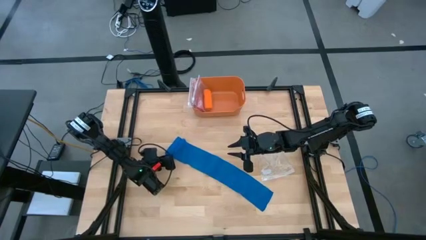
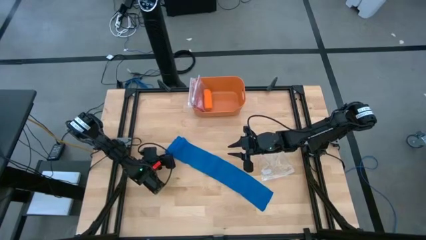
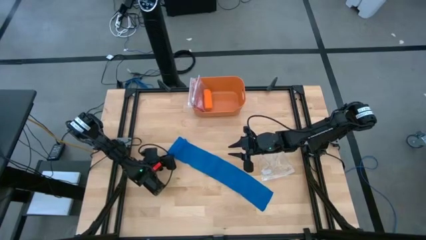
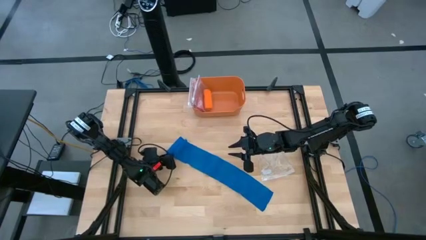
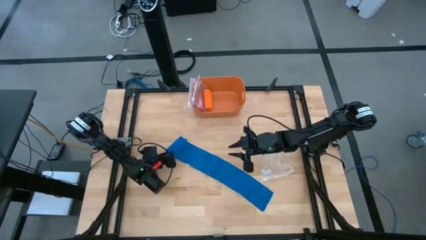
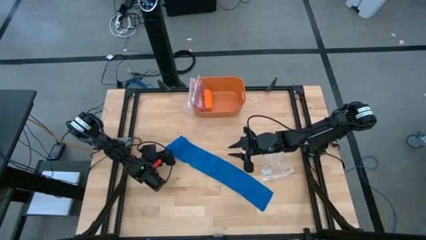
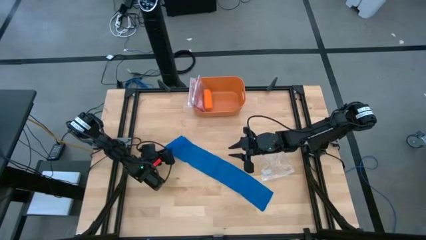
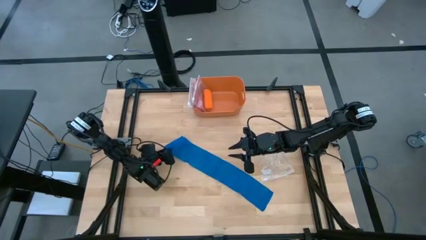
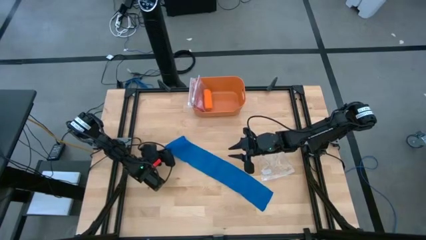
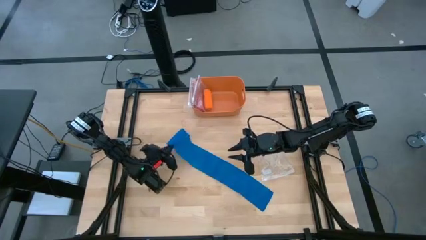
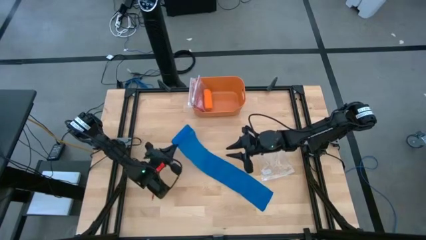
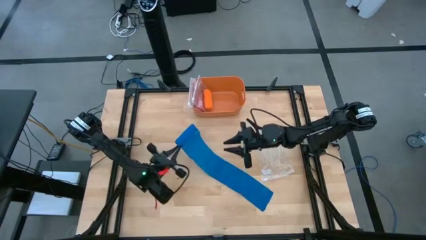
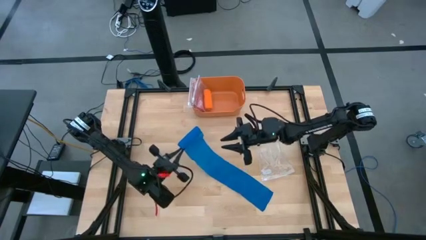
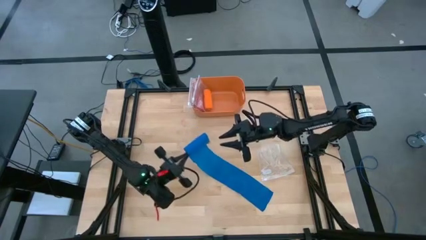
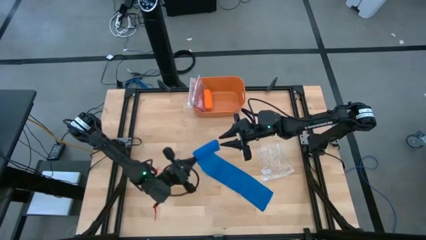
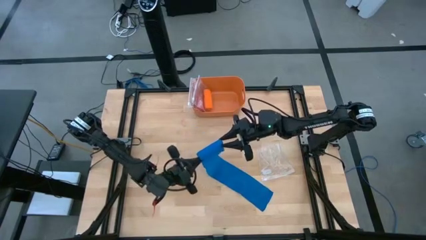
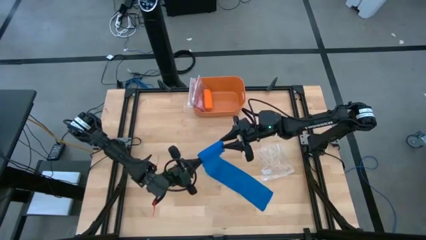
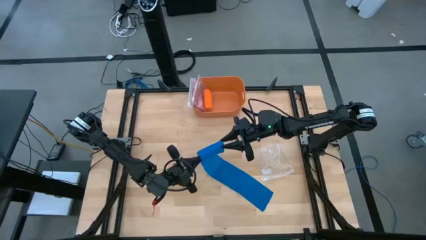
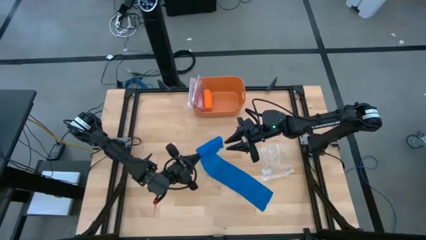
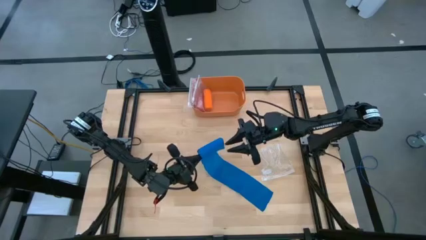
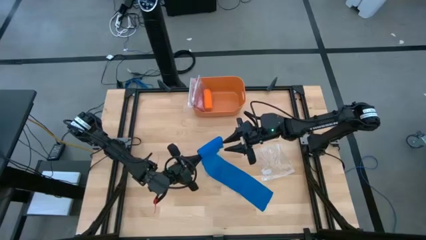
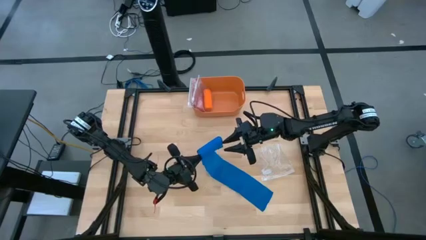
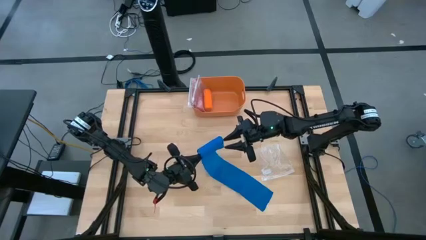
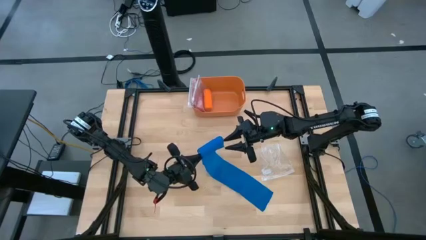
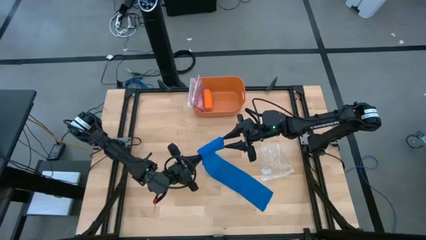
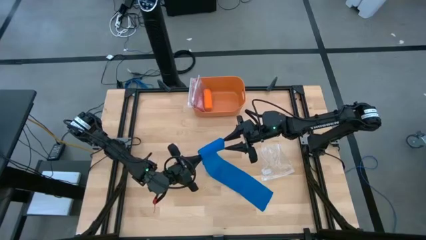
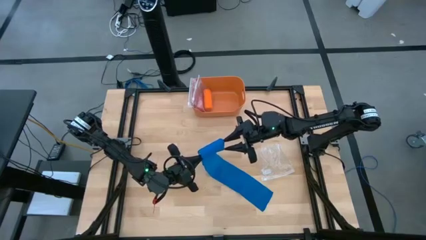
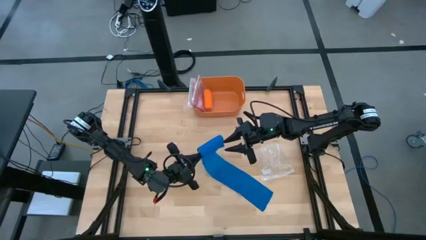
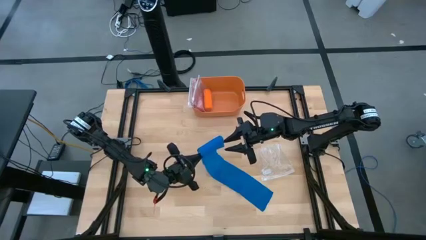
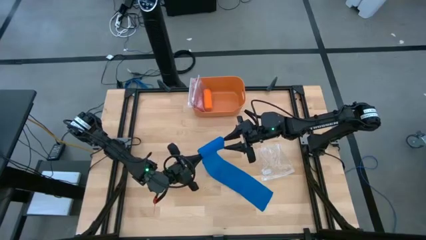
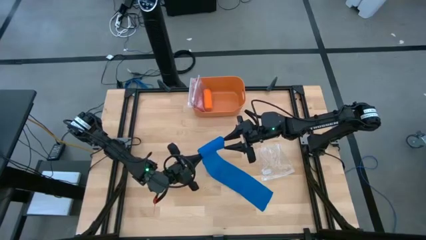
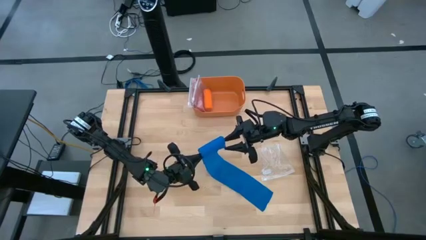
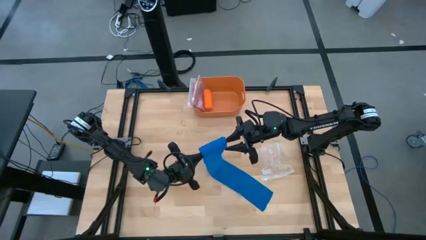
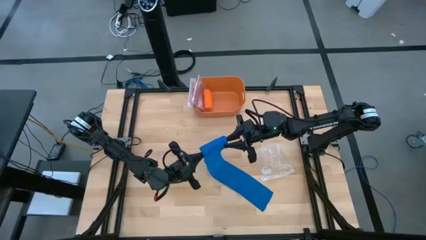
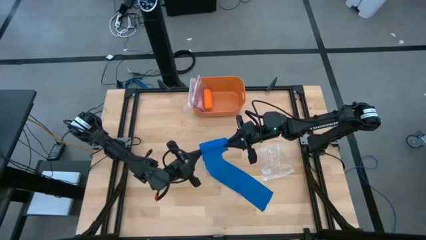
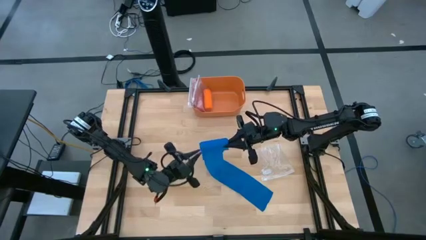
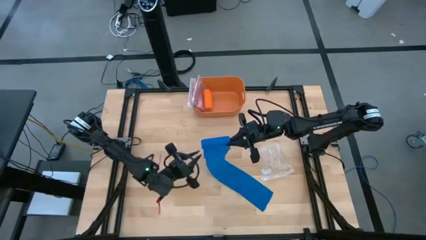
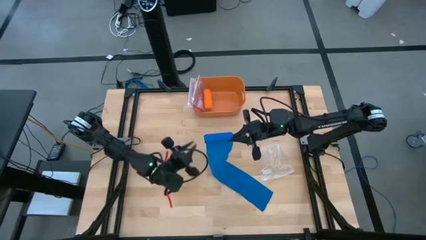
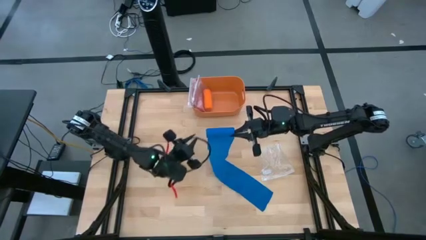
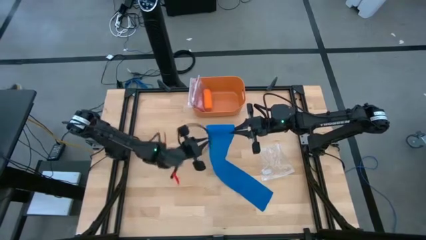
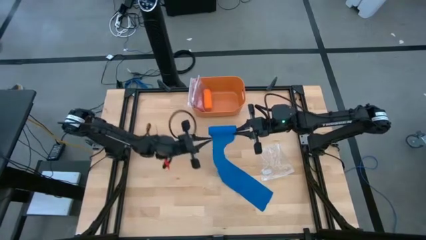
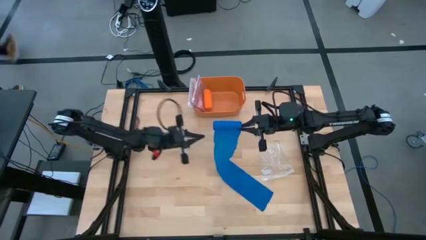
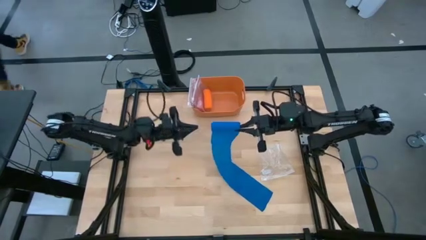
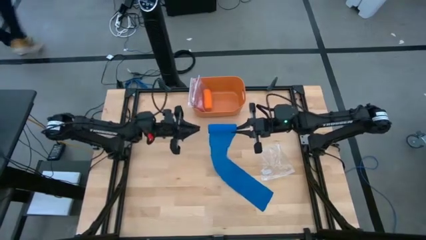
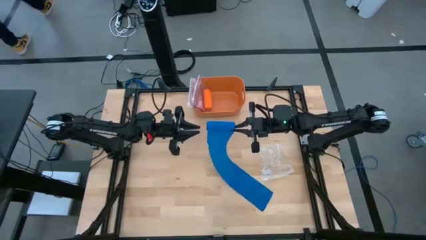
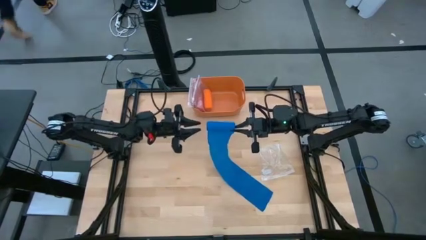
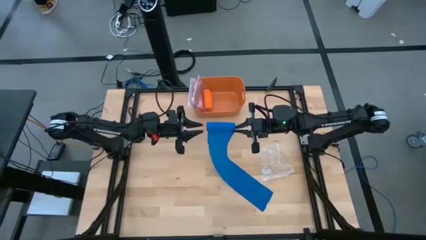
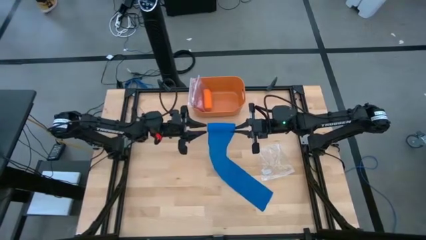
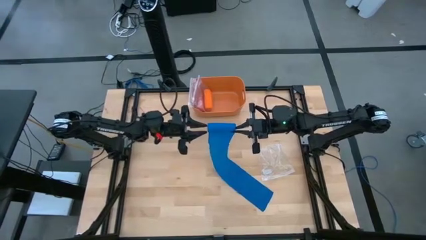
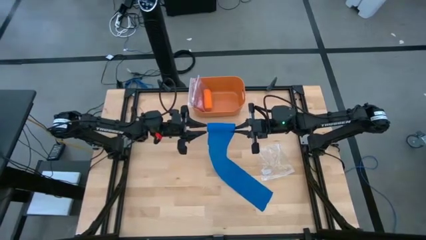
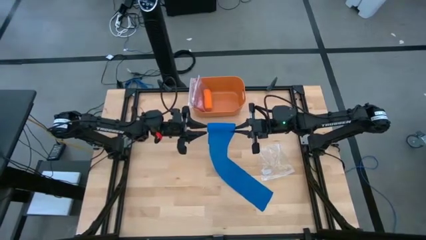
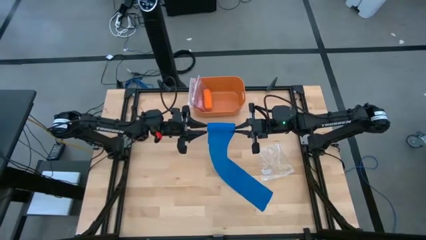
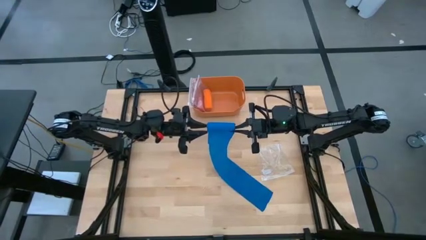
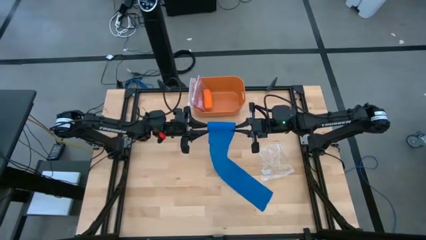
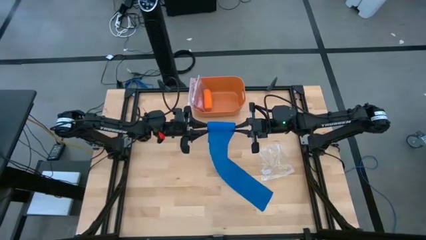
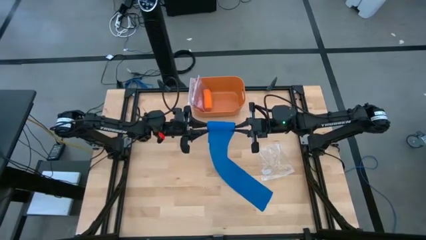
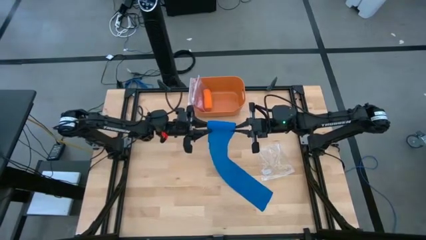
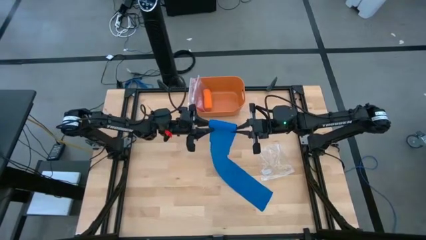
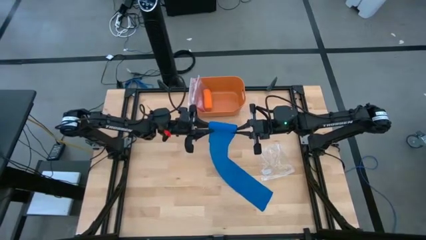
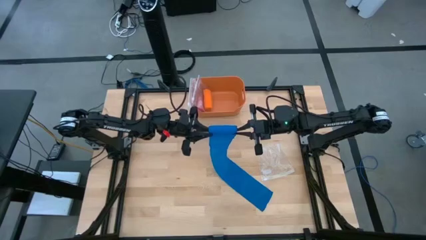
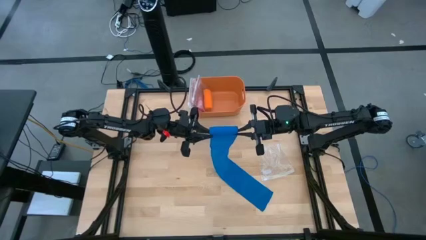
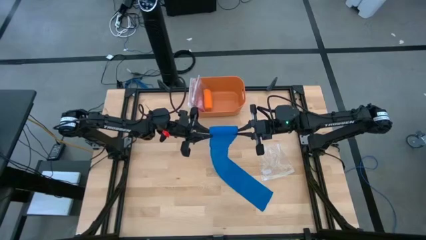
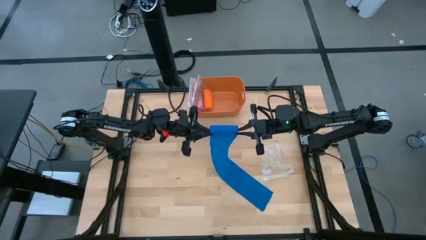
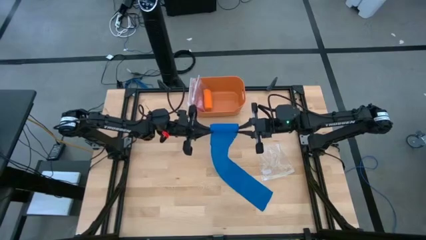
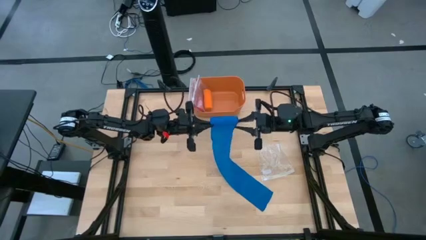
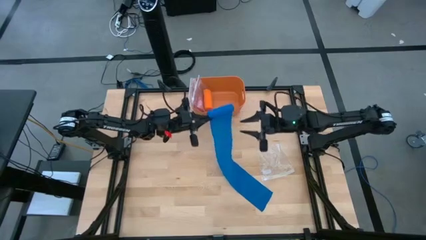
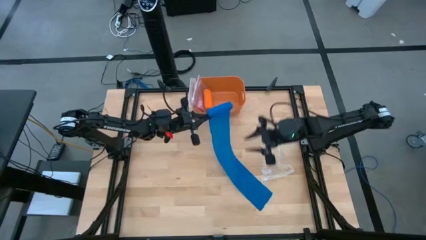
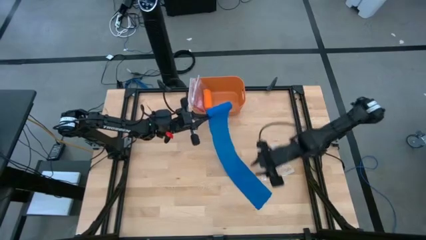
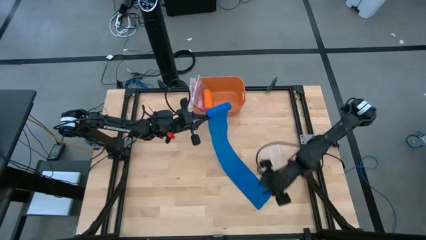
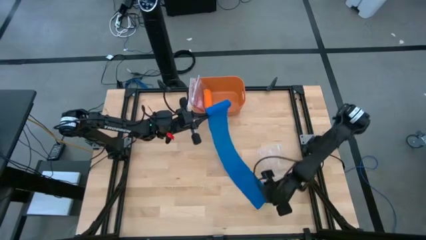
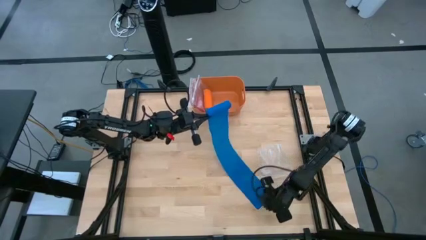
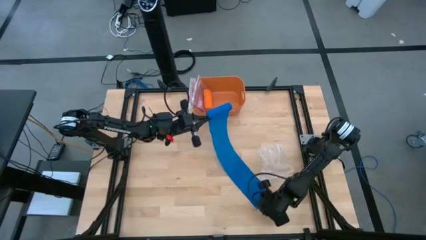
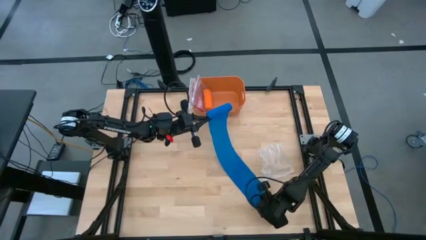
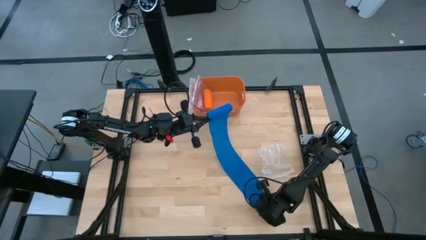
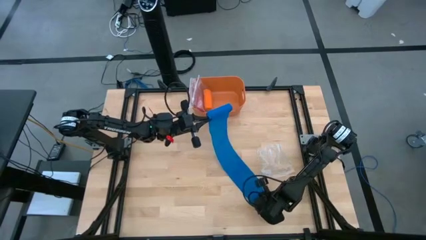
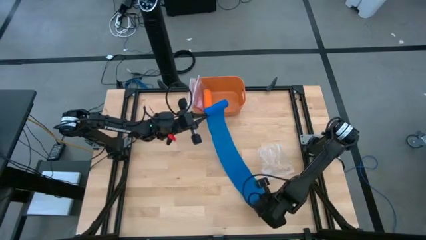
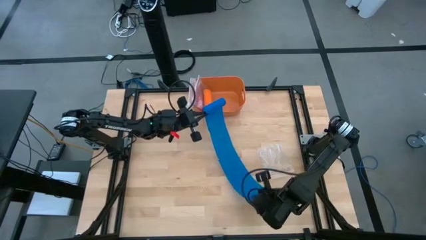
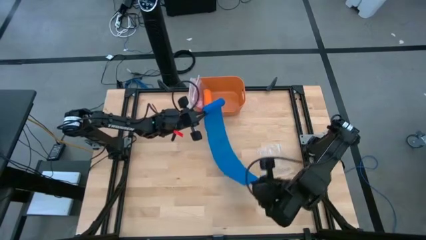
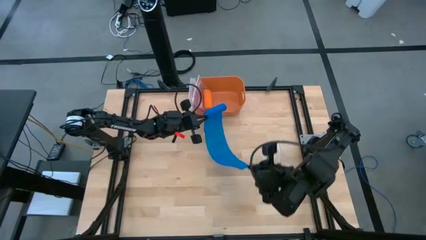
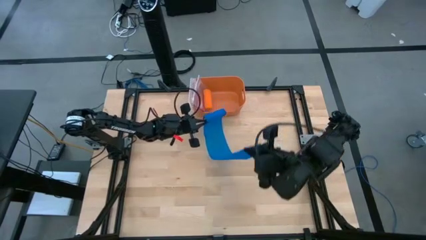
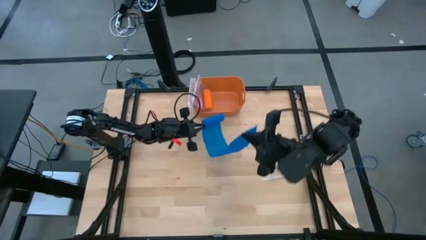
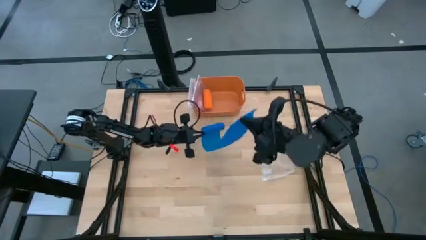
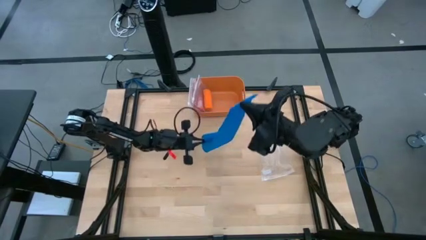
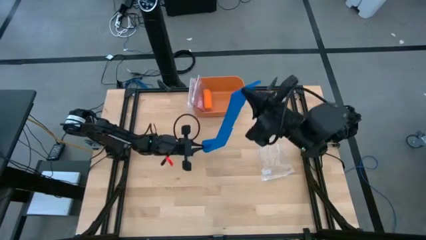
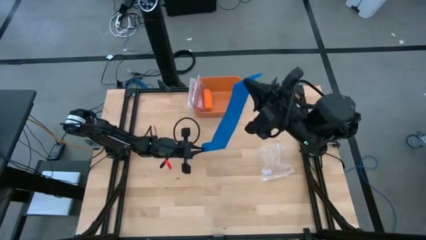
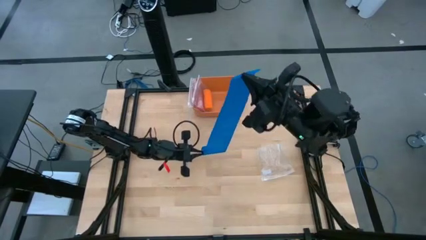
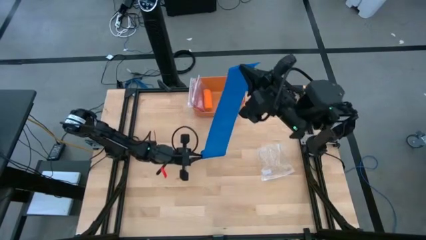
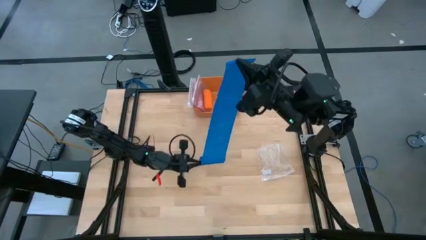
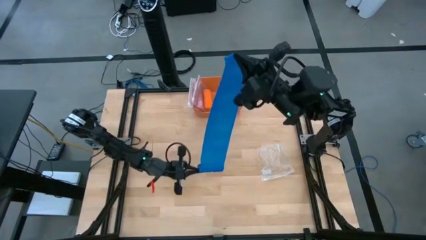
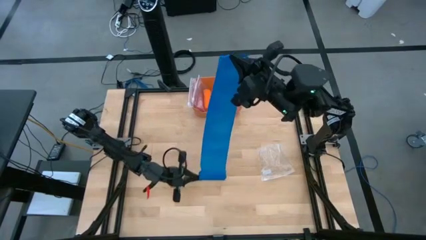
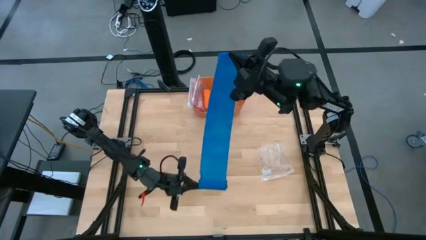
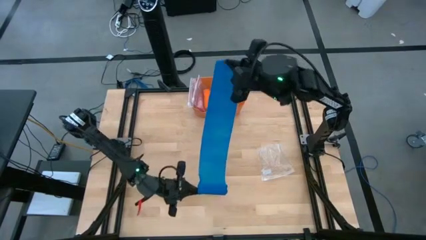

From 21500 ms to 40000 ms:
Task: Roll bandage
Roll the blue bandage
